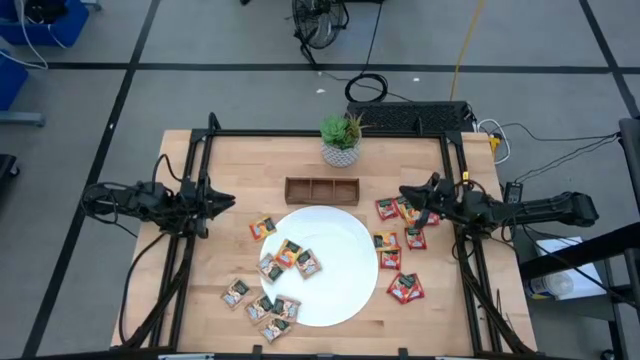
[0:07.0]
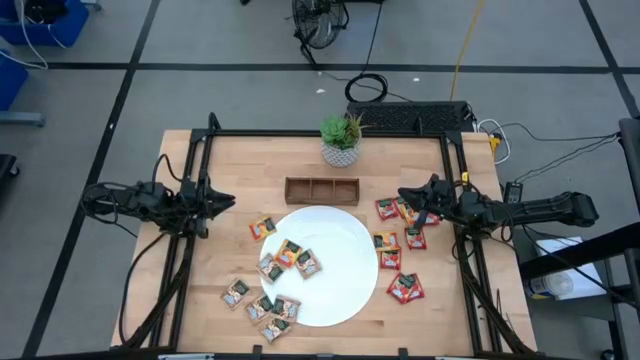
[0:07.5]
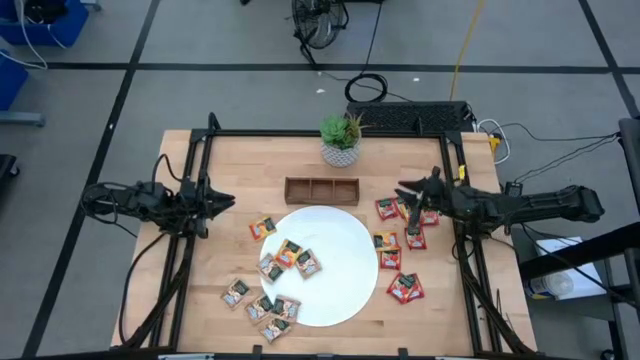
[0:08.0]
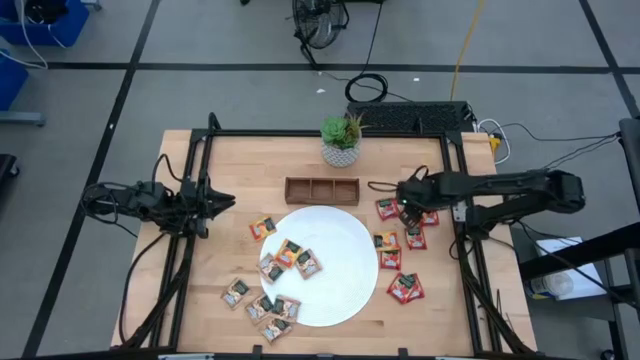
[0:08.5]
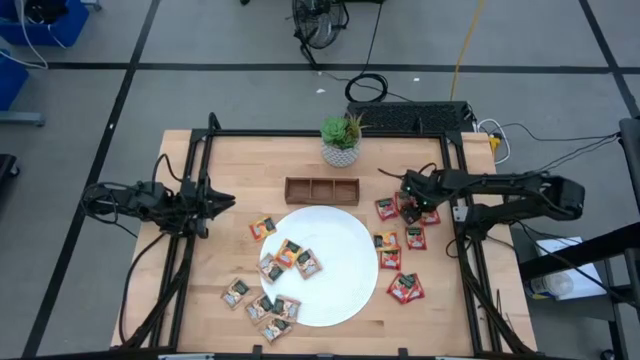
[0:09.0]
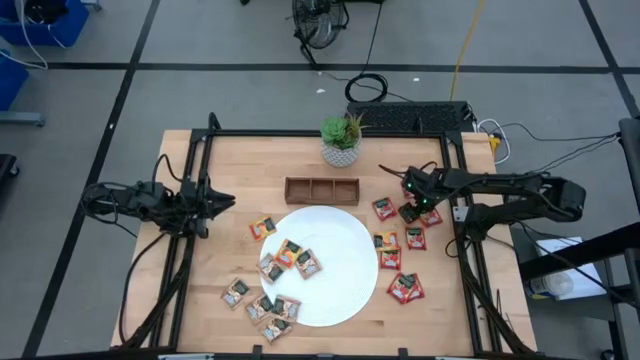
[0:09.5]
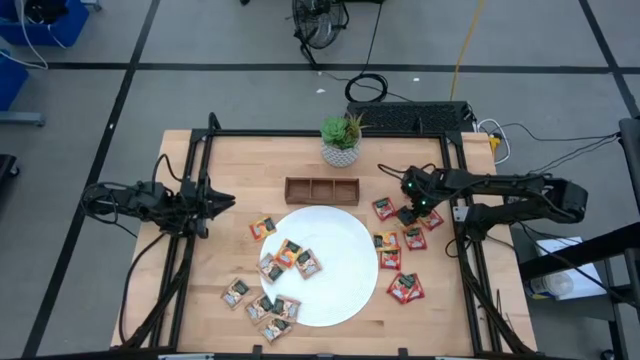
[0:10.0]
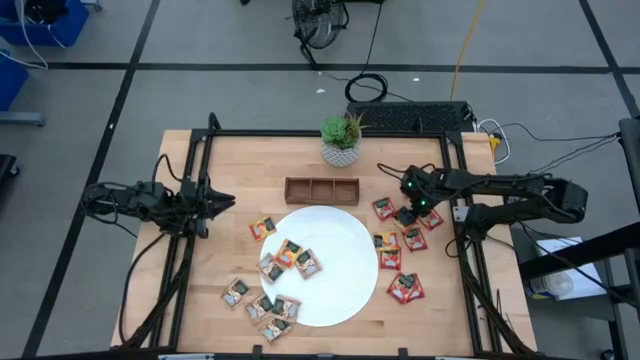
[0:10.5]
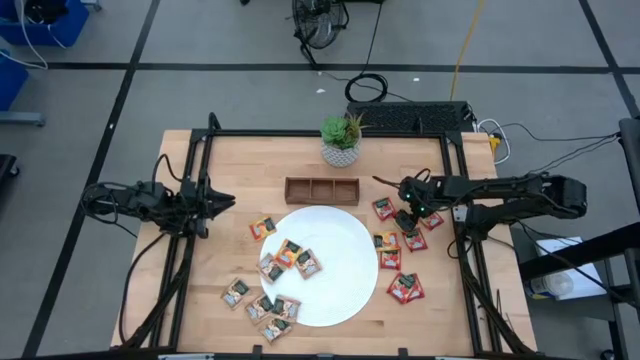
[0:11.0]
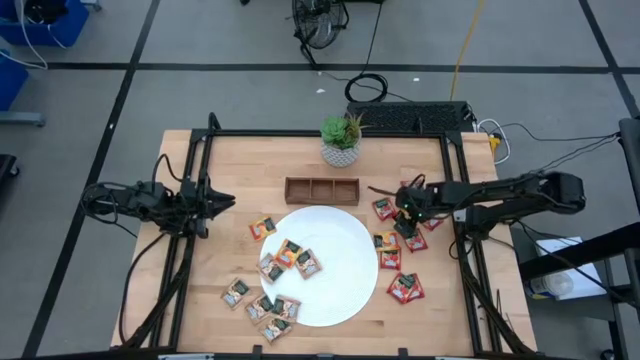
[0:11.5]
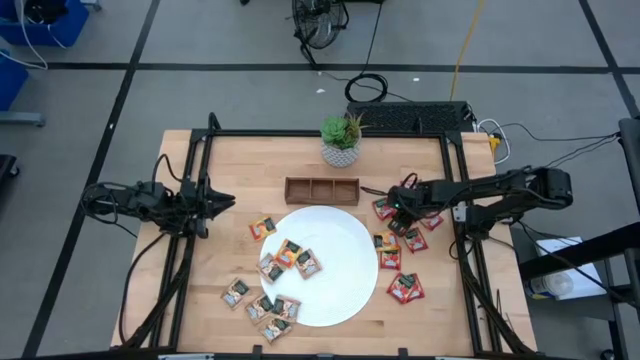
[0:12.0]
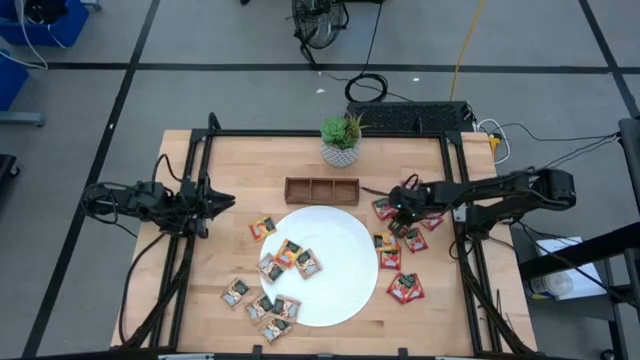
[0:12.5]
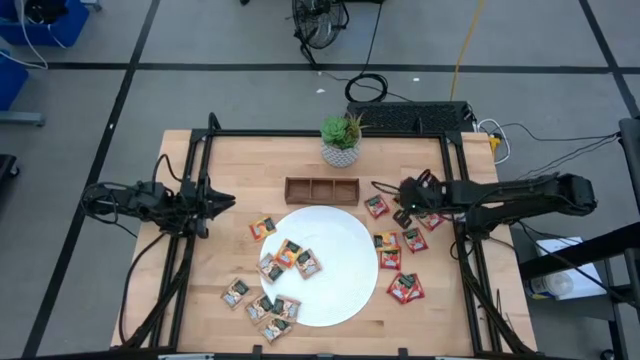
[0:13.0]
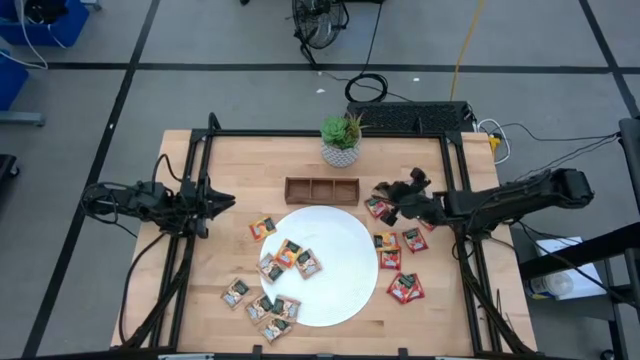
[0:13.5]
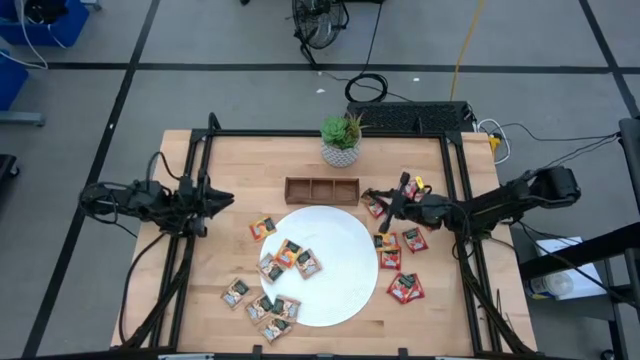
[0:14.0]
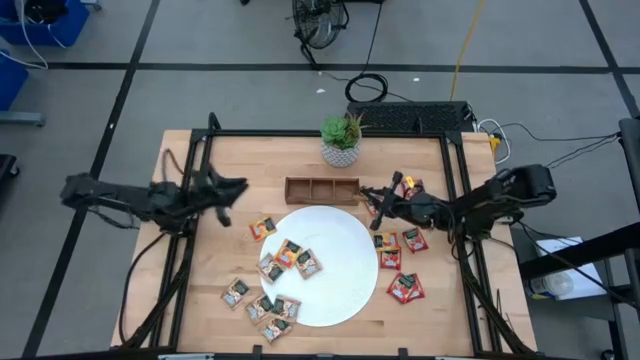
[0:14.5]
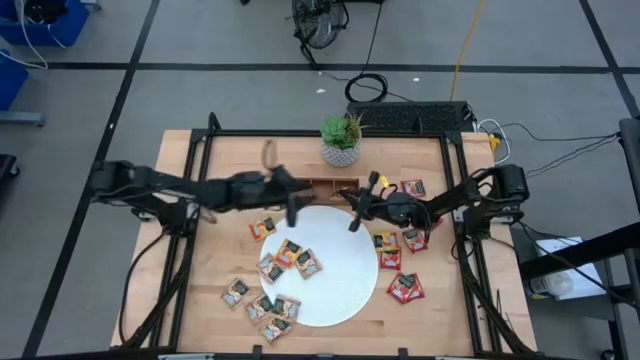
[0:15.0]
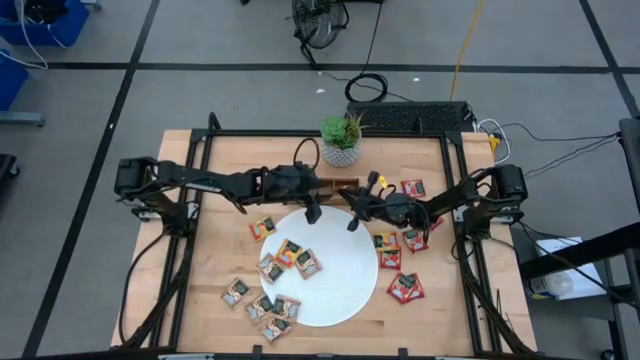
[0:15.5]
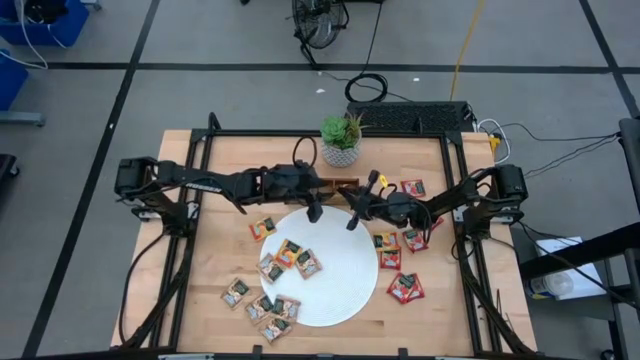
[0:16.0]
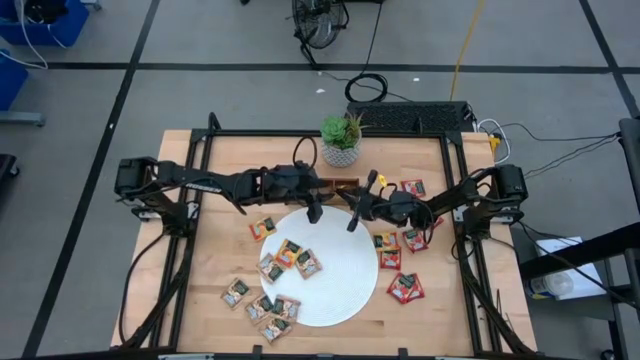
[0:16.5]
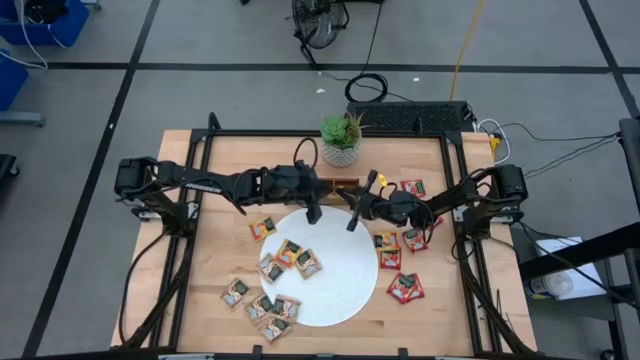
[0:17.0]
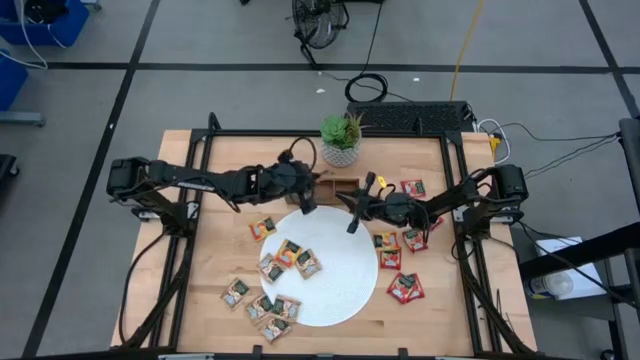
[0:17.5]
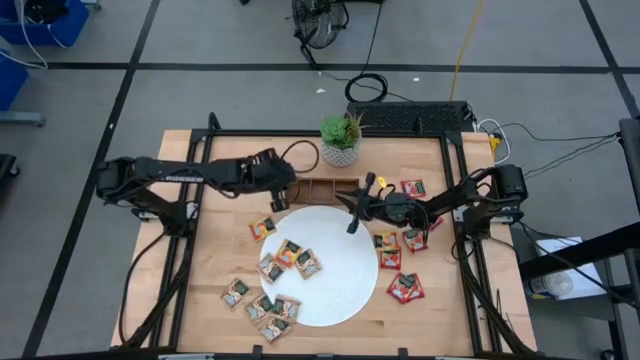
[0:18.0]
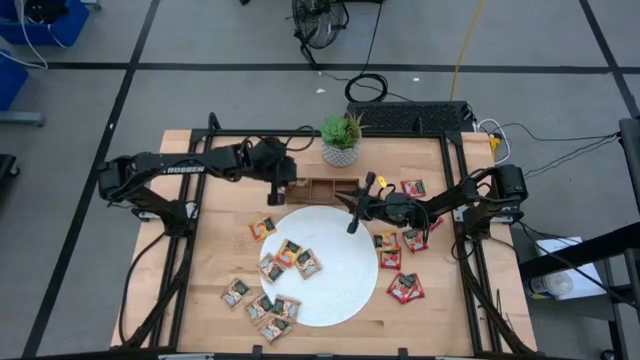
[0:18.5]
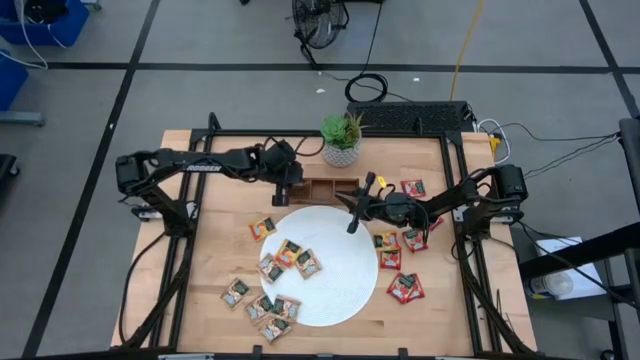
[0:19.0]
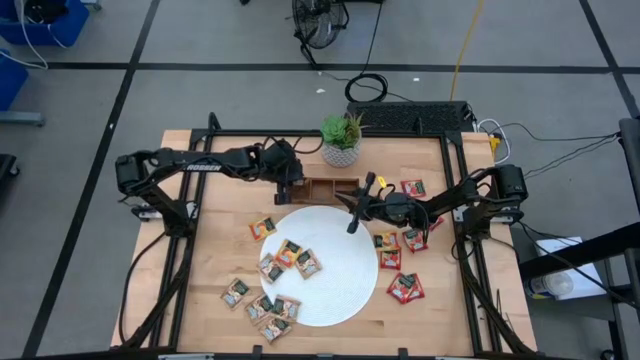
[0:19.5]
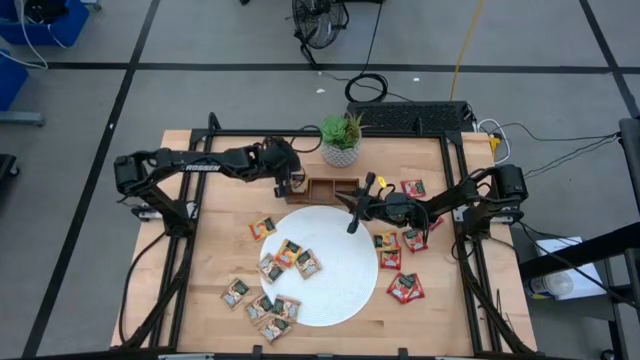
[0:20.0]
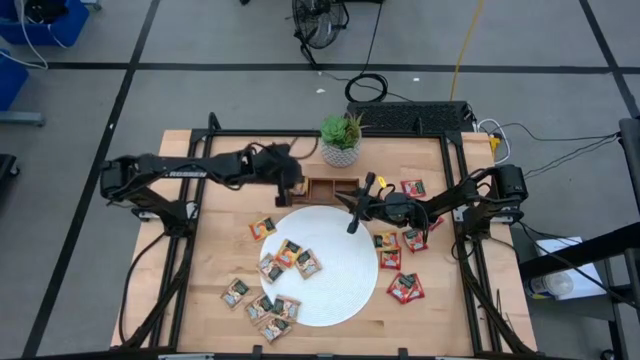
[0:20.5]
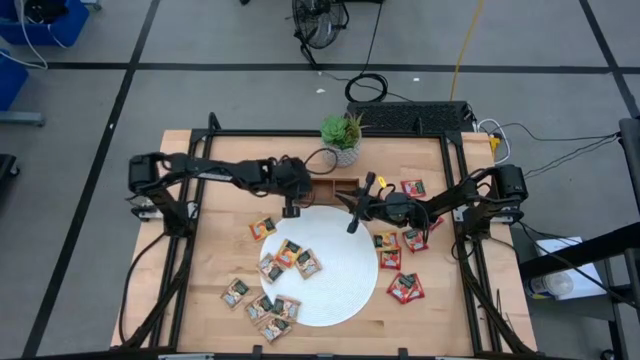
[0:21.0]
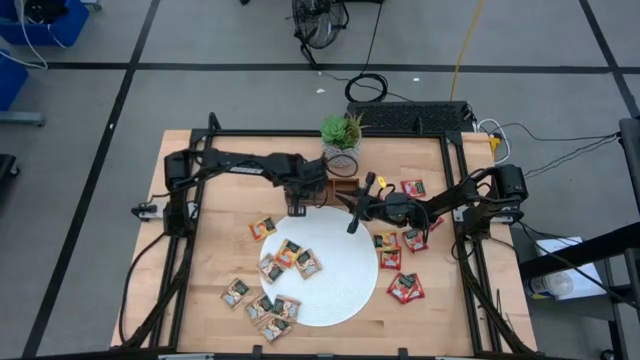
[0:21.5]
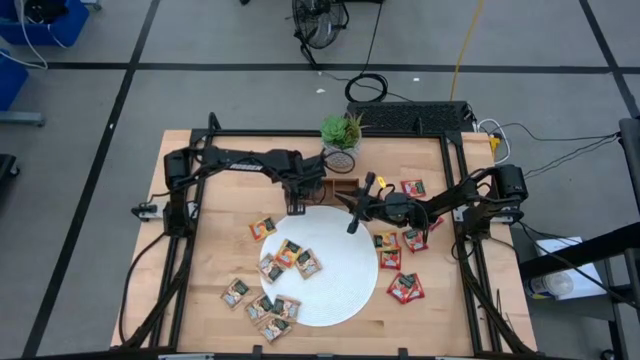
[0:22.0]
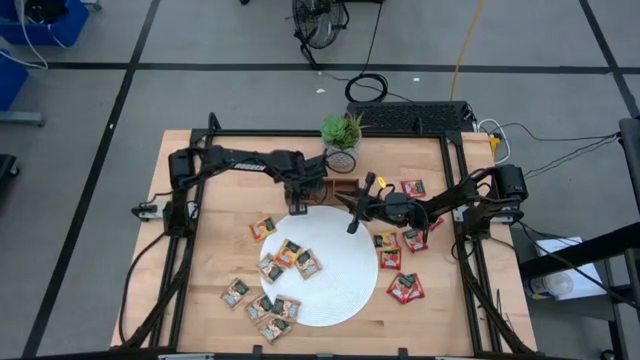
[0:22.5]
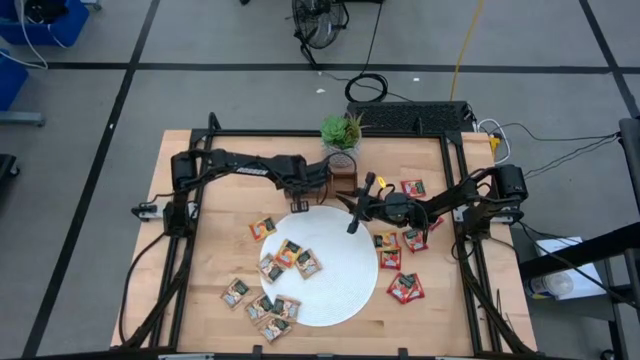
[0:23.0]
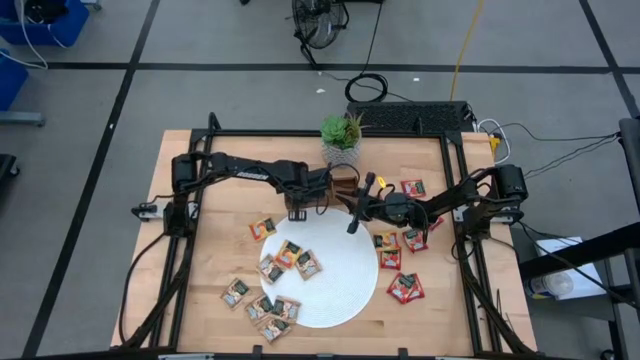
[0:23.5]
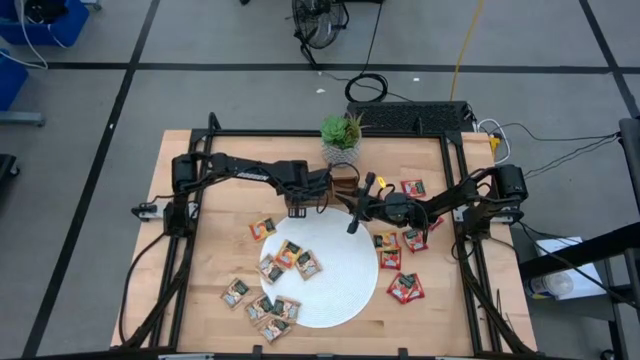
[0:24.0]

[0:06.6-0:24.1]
Task: Pick & Place Tea
Put the mango tea bag into the wooden organizer
